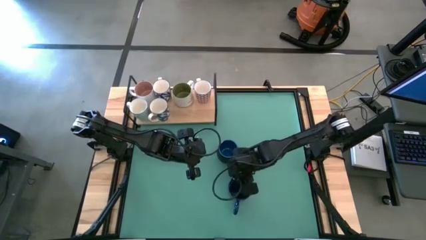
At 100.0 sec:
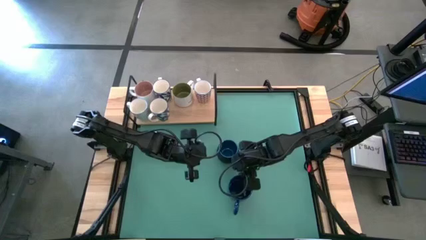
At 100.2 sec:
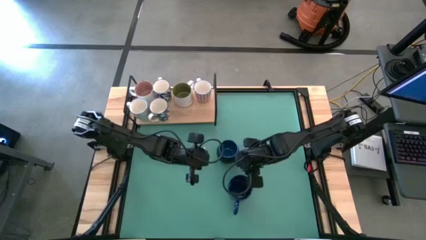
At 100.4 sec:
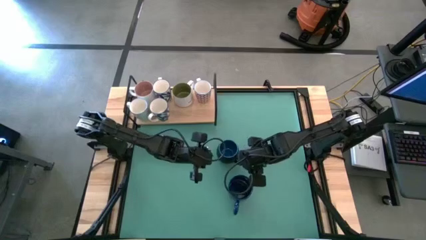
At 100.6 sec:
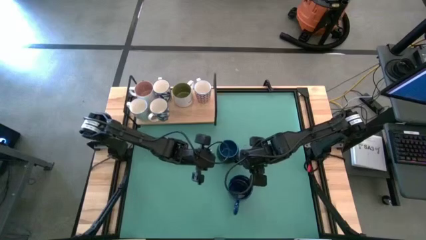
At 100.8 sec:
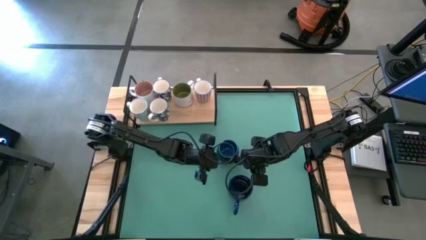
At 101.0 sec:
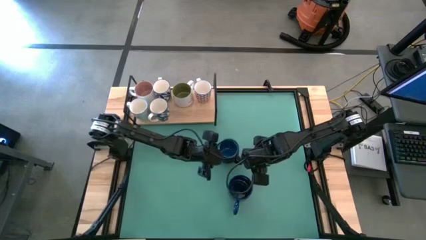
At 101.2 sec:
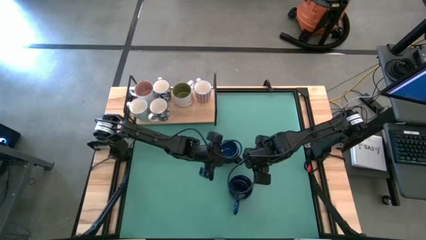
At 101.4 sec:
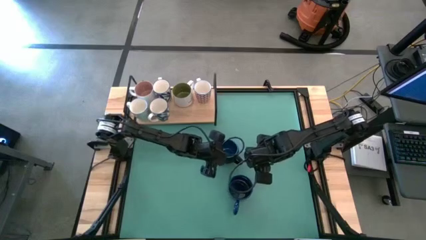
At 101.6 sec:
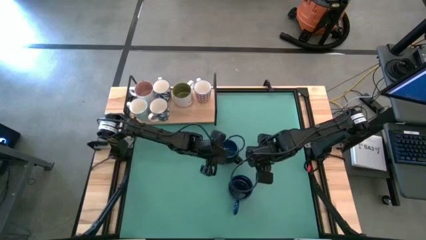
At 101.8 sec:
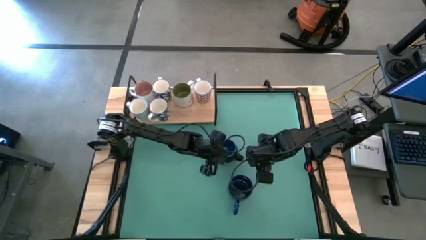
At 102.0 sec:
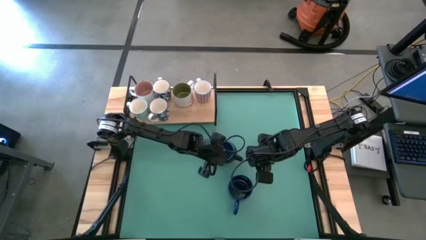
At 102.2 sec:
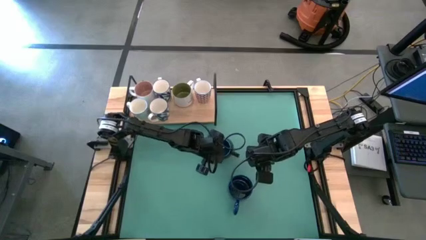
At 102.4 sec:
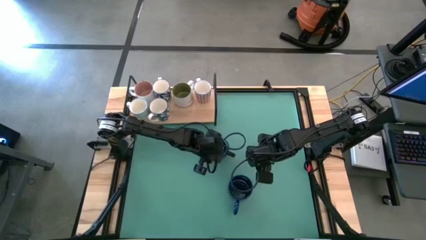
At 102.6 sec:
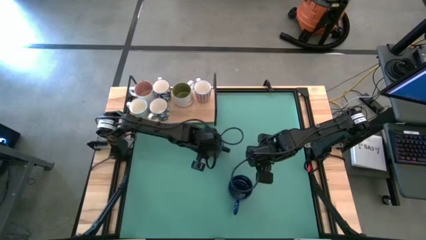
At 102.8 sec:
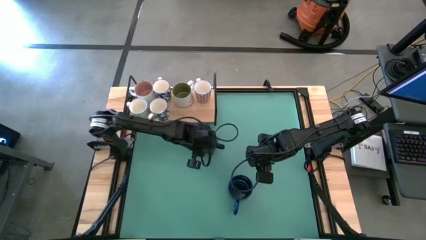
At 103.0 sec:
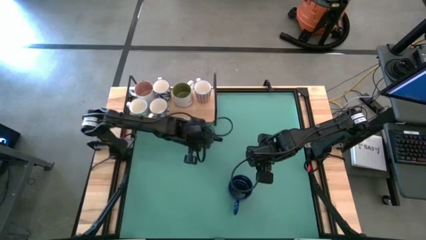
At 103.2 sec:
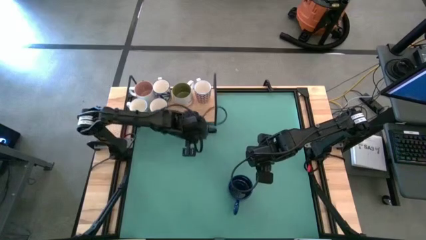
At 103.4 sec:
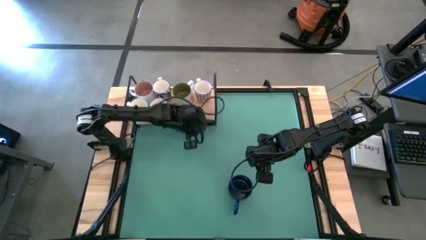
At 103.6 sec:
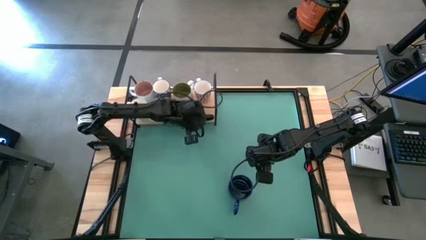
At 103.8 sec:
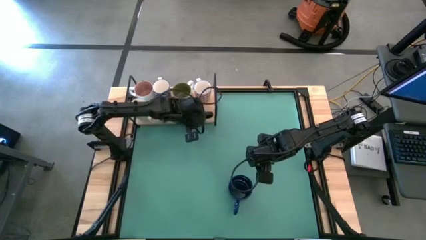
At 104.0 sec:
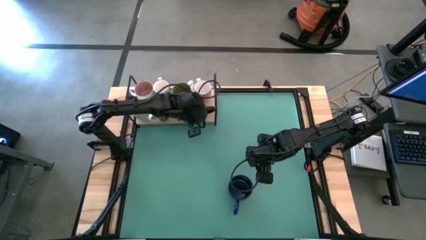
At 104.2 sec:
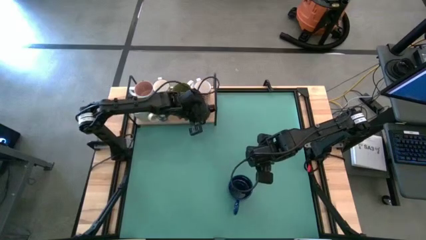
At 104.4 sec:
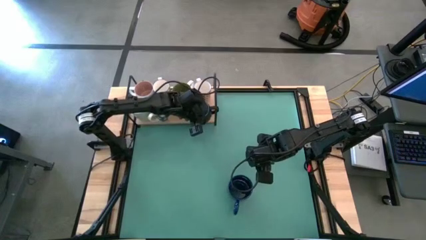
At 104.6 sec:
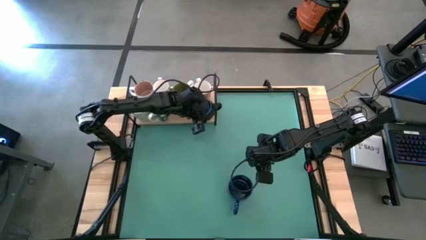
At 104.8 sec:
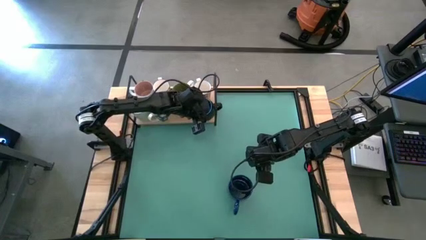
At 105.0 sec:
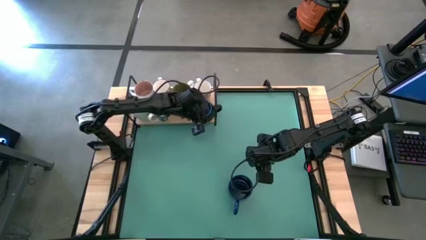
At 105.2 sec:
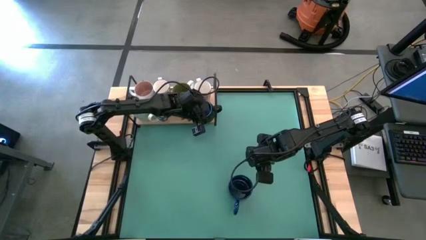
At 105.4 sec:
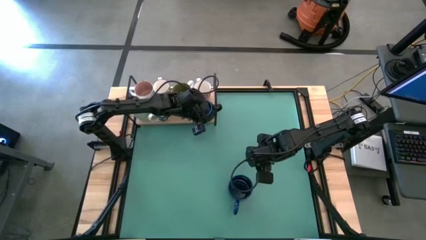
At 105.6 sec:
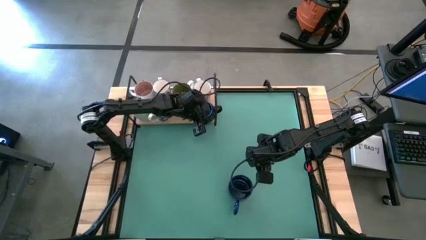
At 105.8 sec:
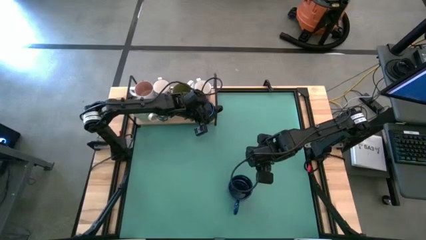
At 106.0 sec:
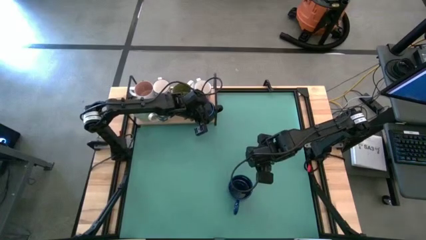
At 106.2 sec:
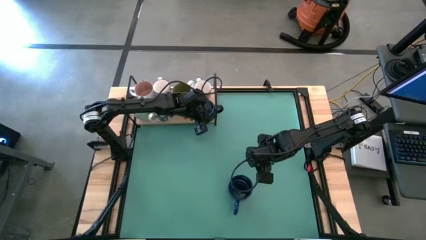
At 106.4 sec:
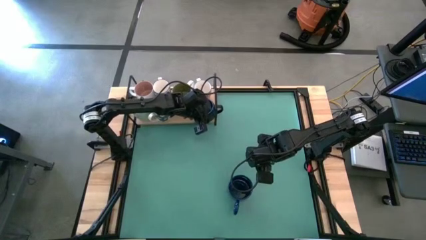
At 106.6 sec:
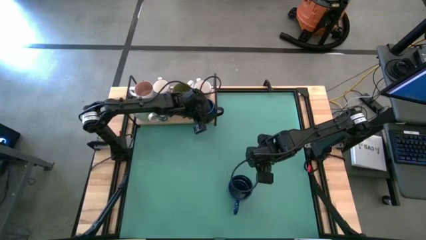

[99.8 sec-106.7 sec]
Task: Place coffee mugs
Put the black mug on the shelf

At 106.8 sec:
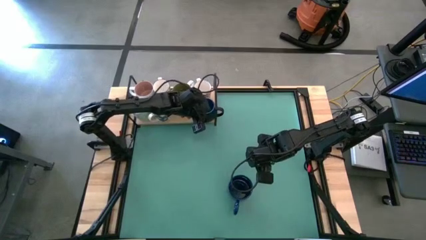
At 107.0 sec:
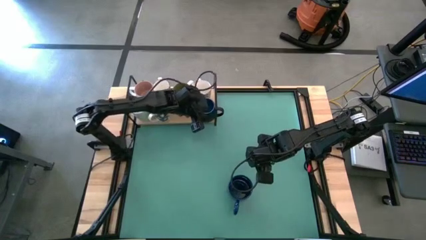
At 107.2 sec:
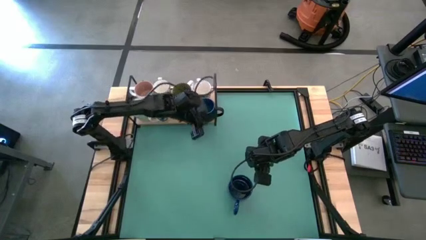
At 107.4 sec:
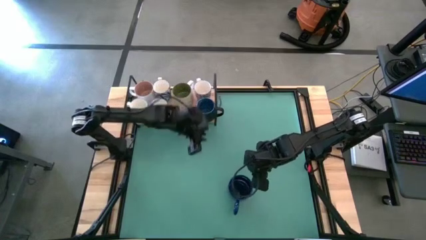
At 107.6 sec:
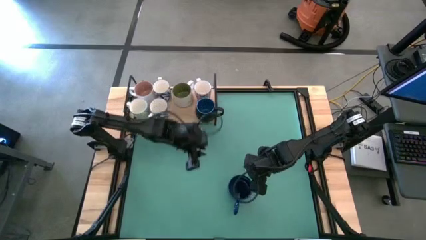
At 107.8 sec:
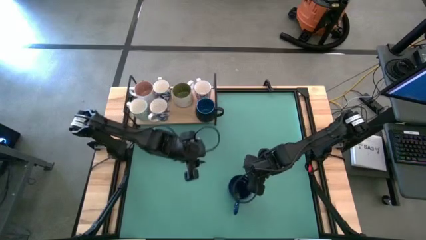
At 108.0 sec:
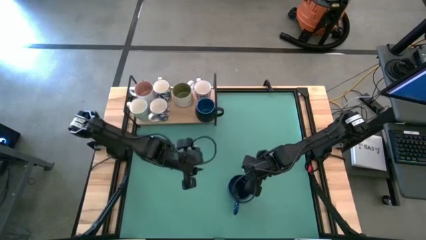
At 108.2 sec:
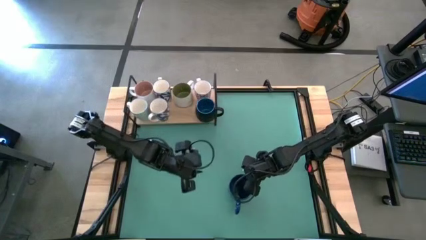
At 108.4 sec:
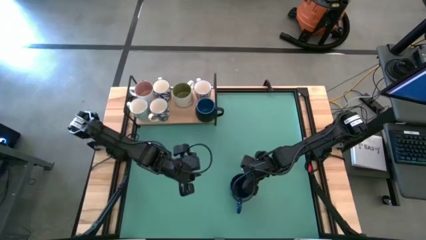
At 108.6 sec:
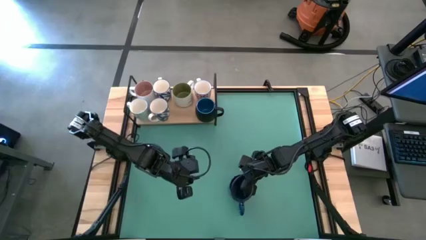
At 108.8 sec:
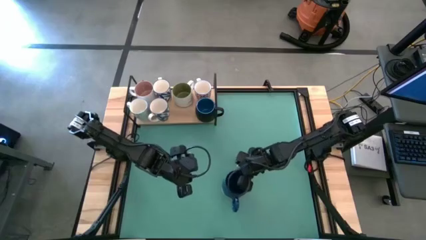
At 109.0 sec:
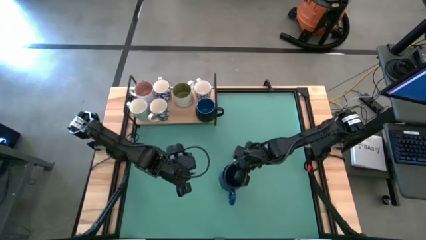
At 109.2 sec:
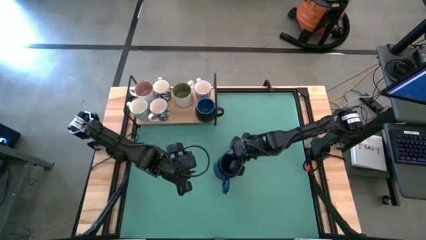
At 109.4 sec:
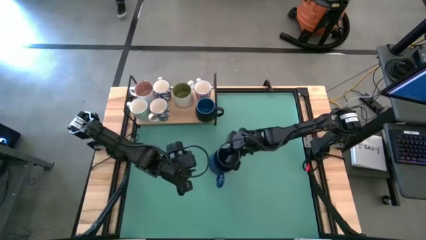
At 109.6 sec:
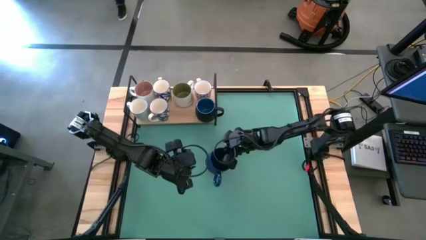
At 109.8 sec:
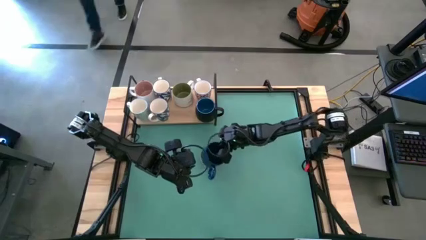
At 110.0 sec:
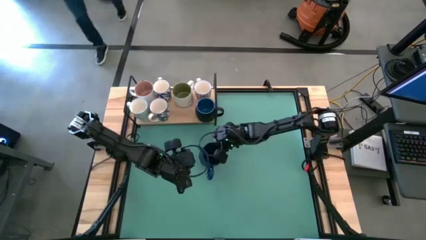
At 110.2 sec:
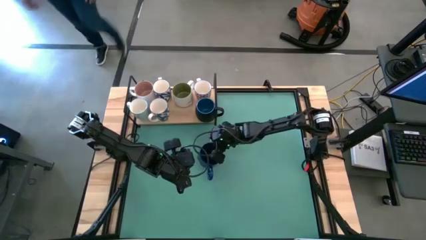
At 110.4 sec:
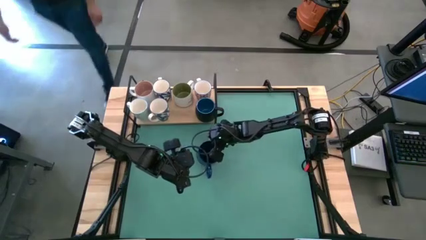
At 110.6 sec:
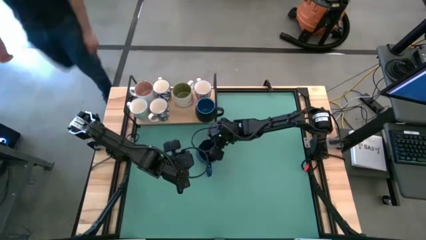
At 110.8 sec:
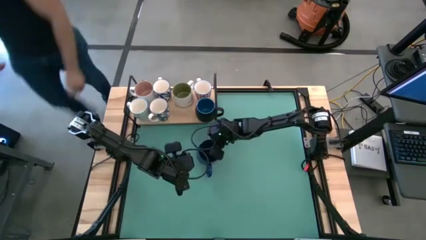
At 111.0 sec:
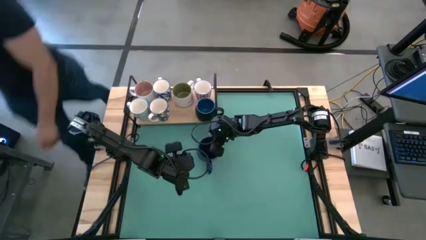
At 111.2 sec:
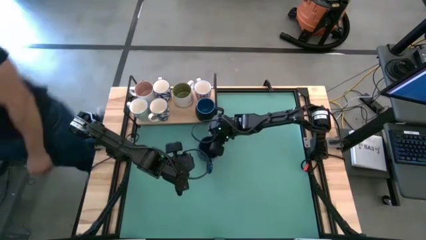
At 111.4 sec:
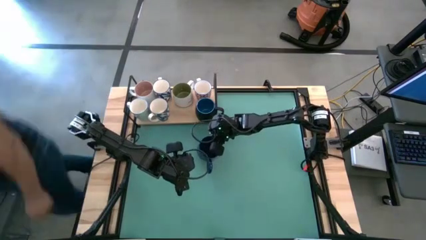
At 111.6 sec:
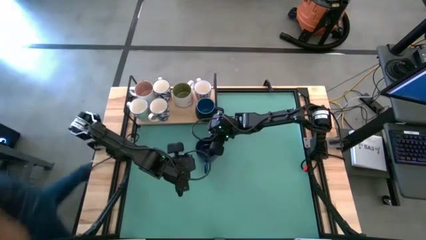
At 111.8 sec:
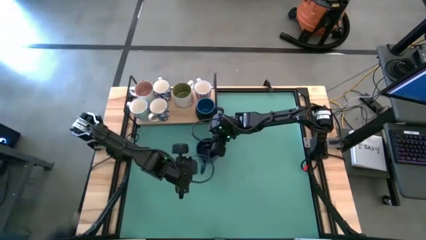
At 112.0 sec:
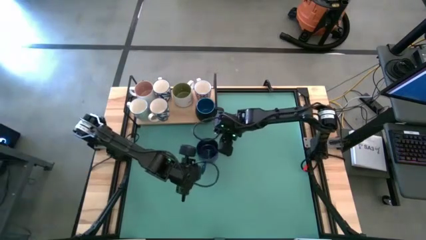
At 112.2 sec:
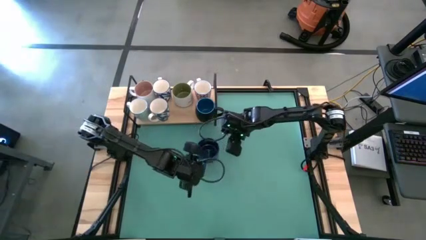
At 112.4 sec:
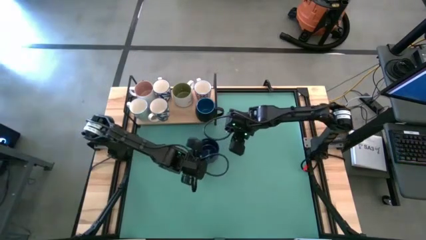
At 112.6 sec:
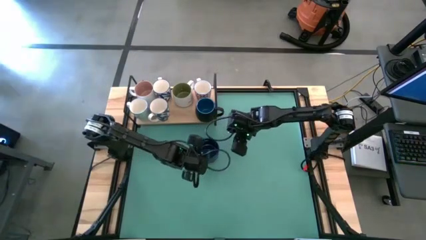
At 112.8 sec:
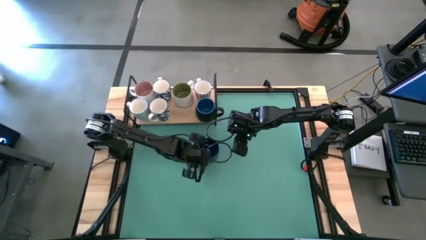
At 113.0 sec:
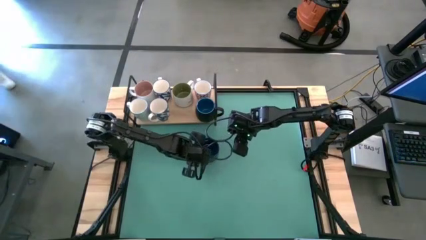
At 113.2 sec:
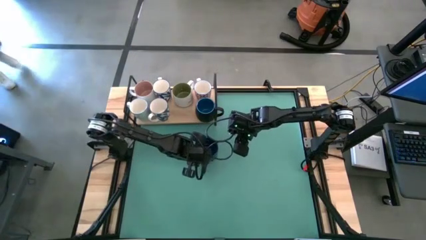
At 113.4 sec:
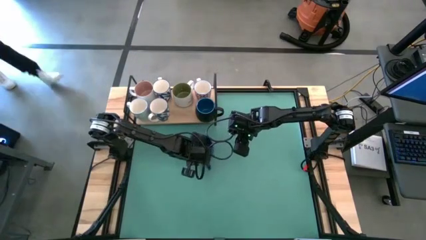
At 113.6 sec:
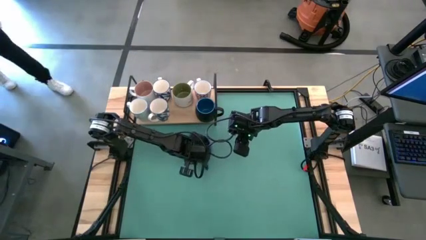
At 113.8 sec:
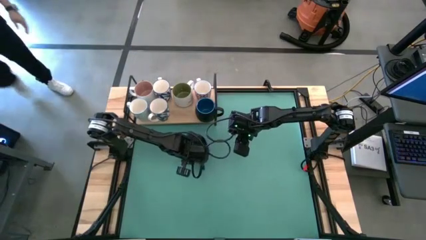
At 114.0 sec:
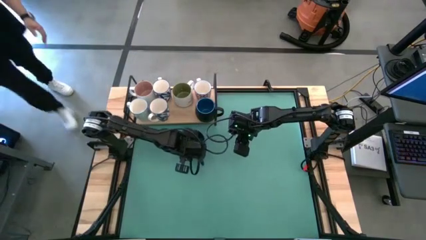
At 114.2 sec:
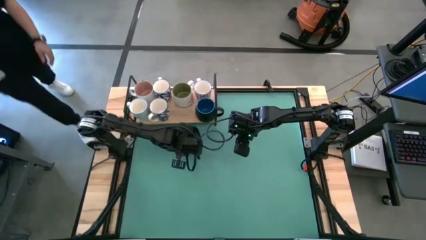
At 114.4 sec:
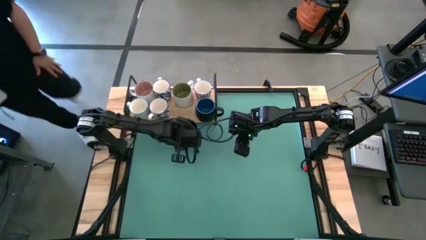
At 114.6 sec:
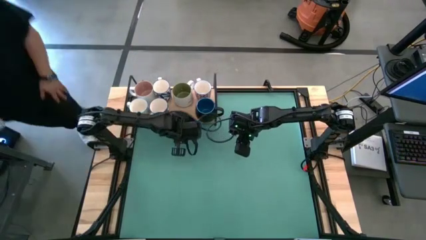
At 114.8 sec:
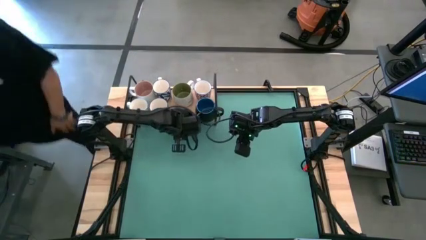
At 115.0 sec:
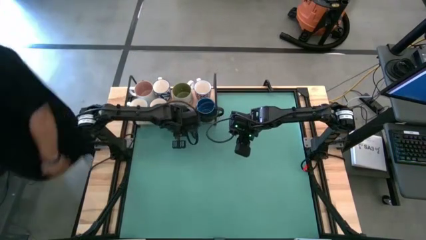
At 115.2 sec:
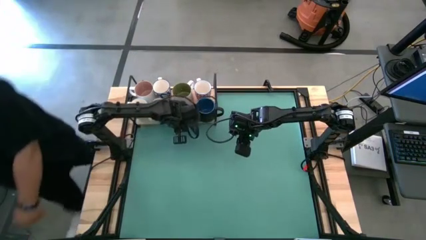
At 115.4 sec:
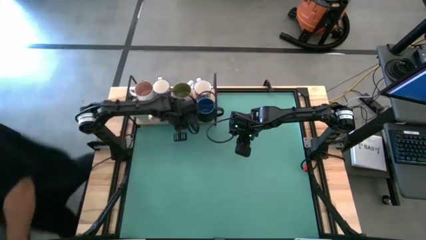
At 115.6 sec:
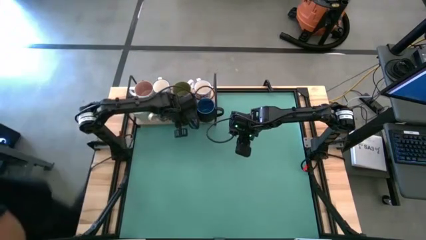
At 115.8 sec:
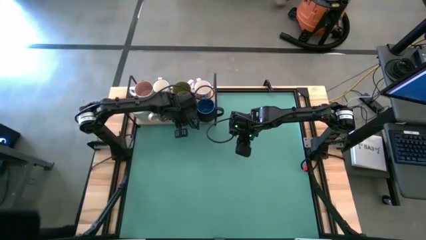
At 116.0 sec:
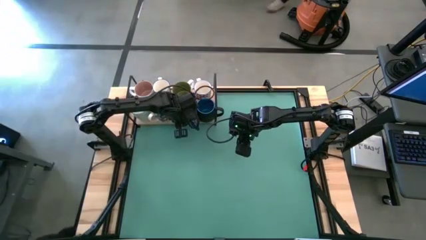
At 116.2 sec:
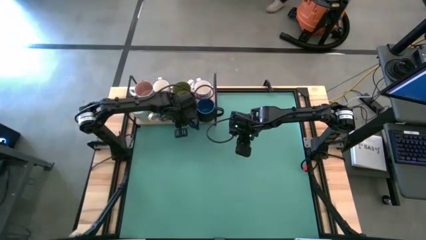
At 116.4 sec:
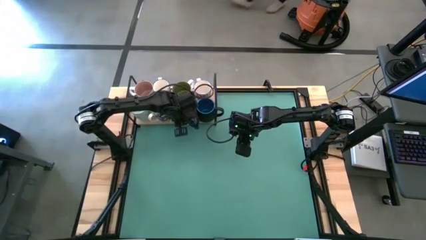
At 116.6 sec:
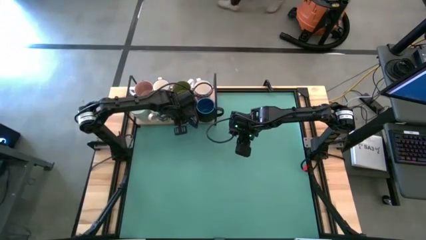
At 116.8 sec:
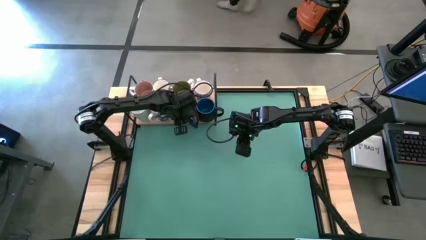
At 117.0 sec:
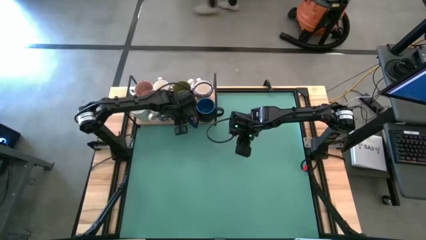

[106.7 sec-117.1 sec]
Put the blue mug on the shelf
